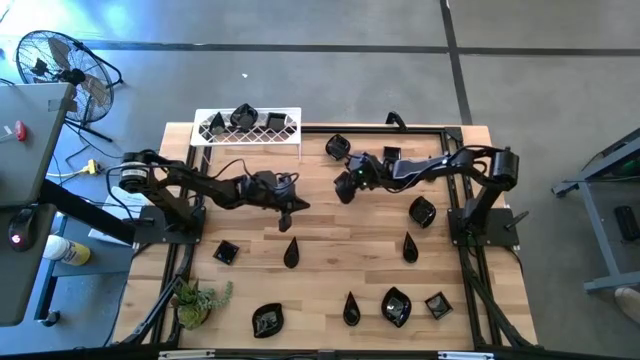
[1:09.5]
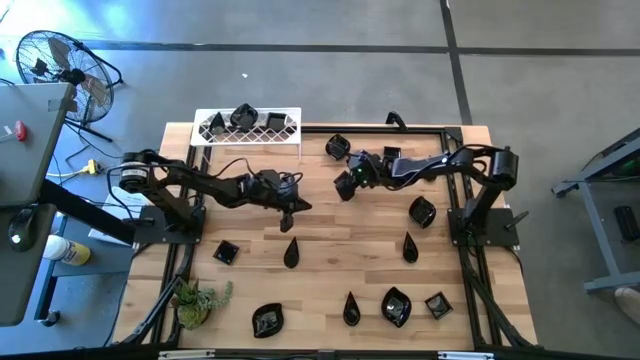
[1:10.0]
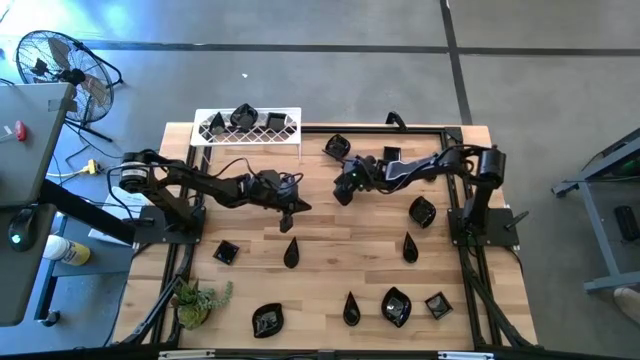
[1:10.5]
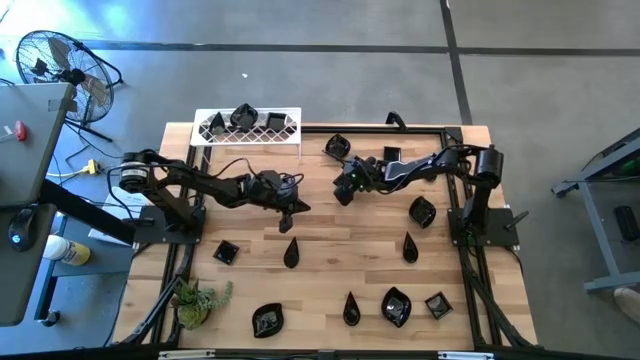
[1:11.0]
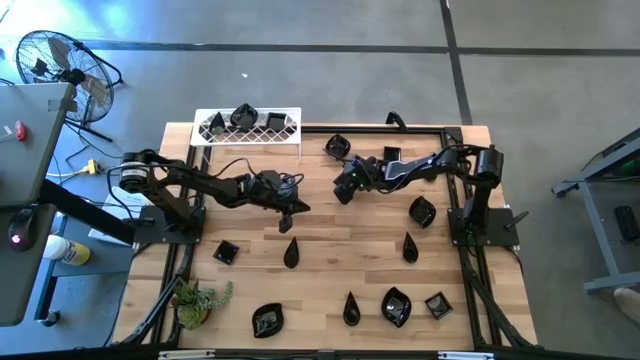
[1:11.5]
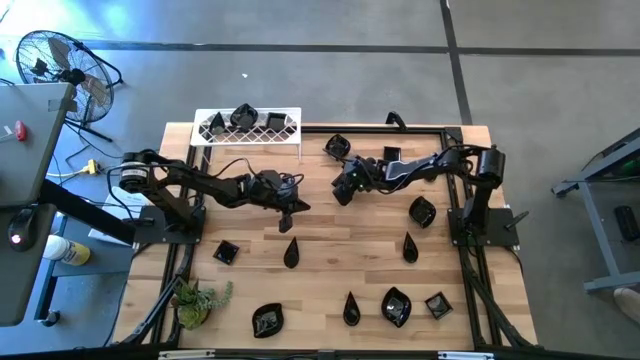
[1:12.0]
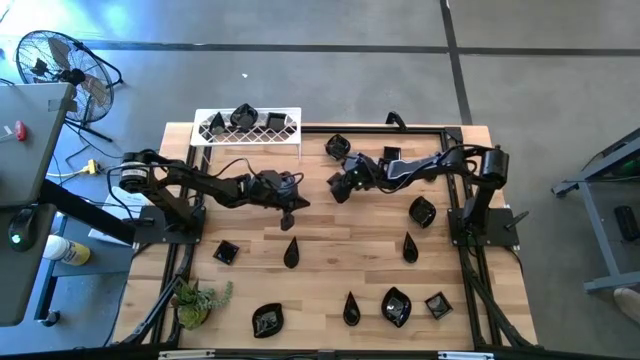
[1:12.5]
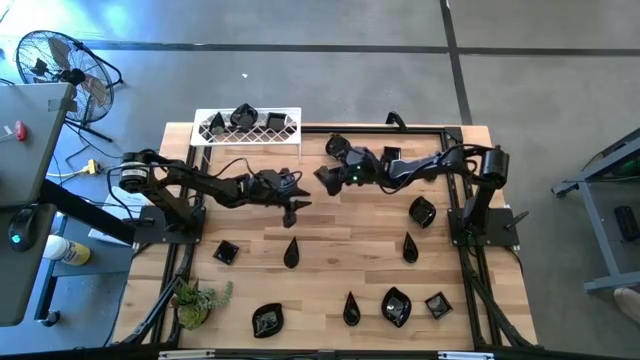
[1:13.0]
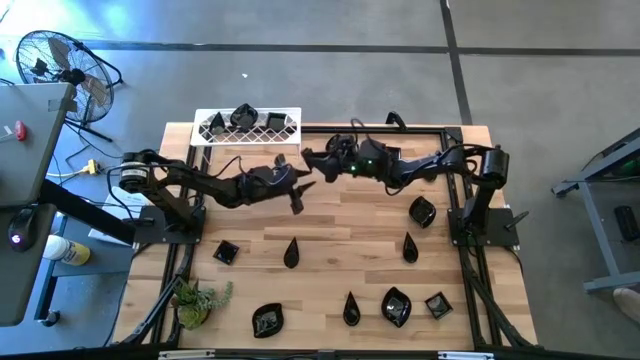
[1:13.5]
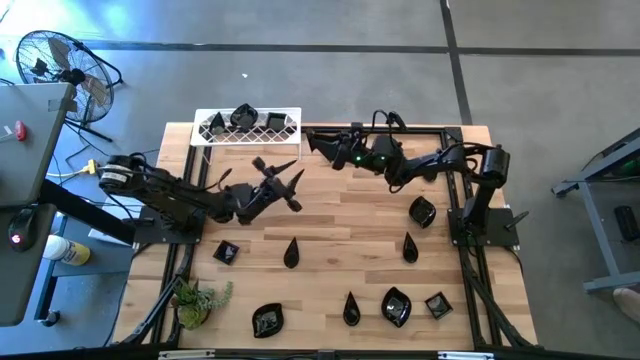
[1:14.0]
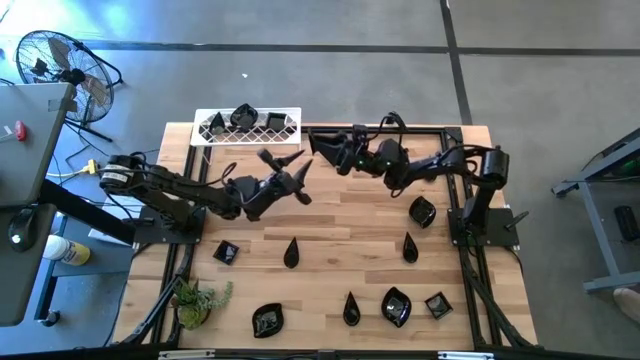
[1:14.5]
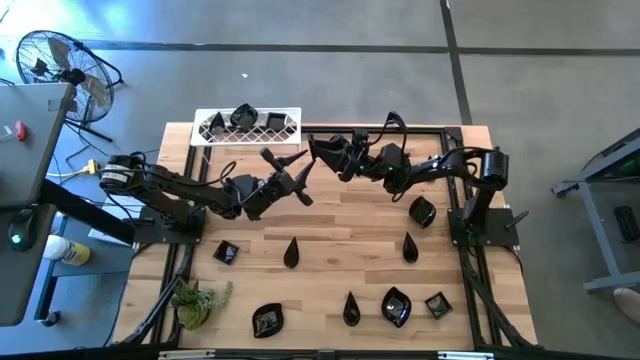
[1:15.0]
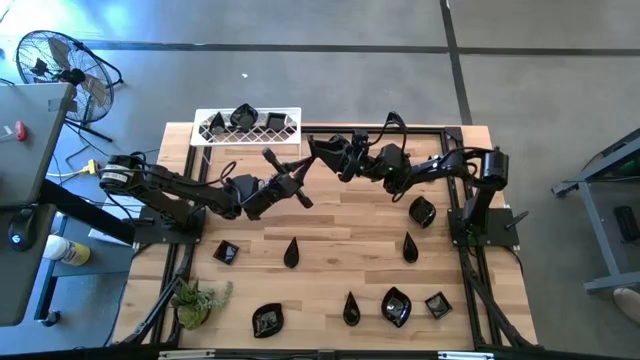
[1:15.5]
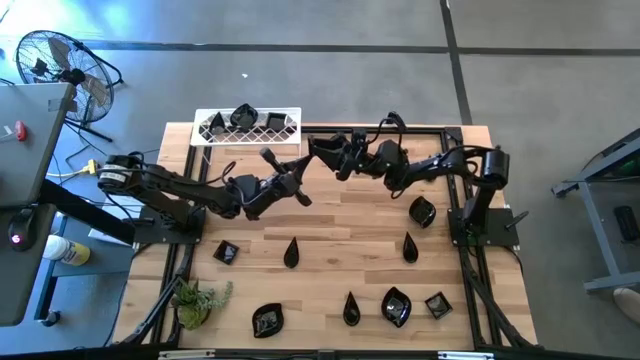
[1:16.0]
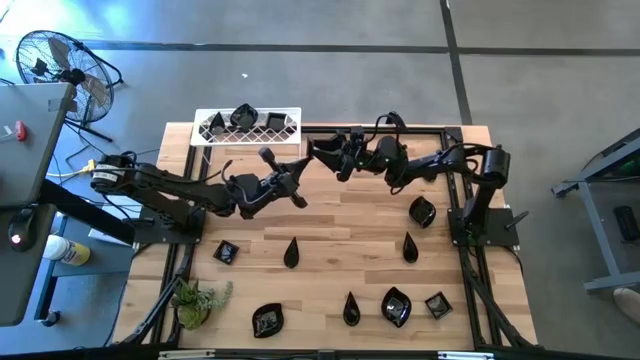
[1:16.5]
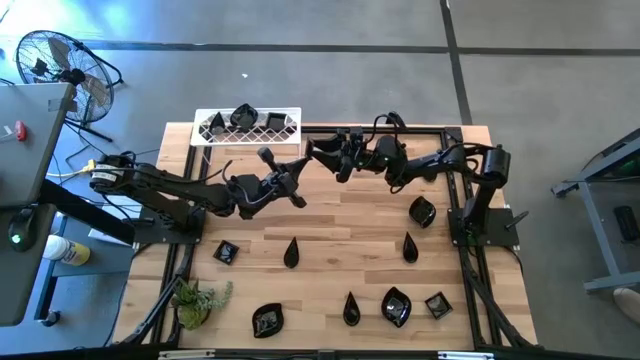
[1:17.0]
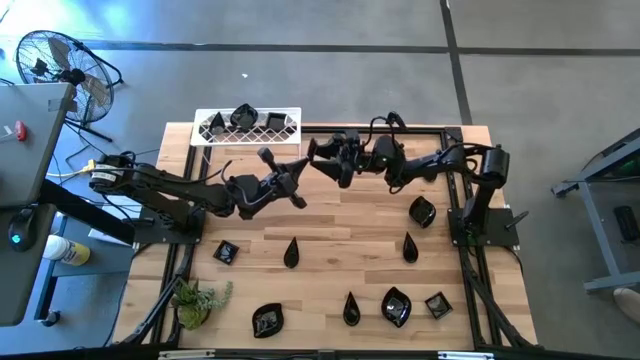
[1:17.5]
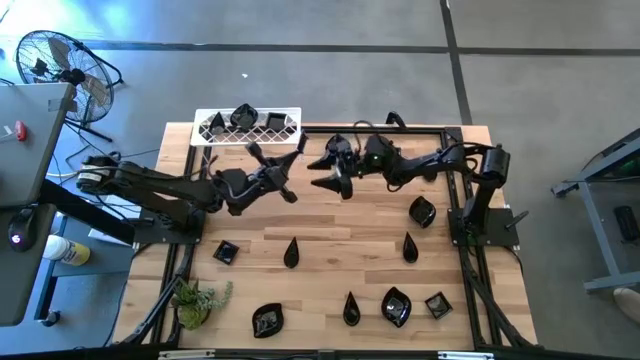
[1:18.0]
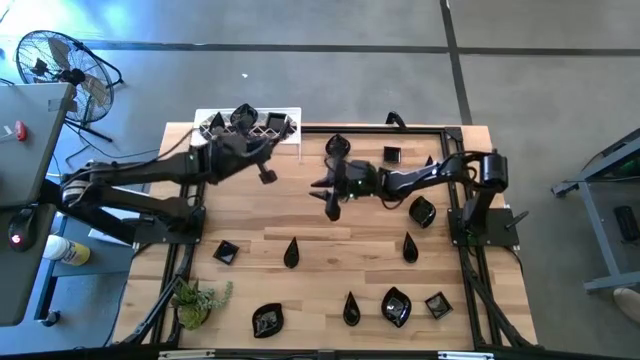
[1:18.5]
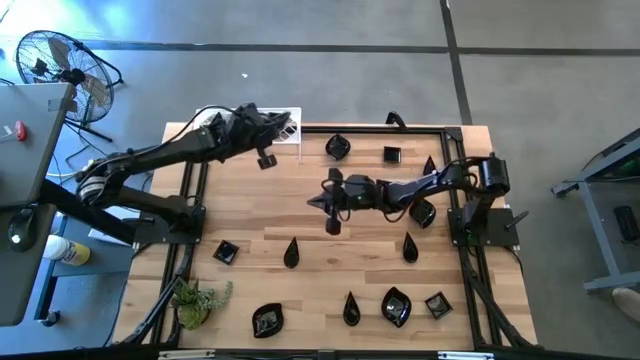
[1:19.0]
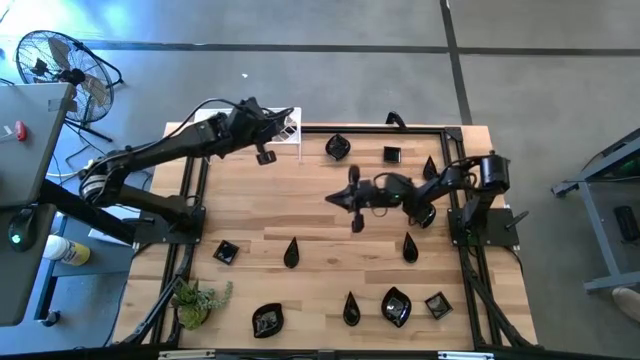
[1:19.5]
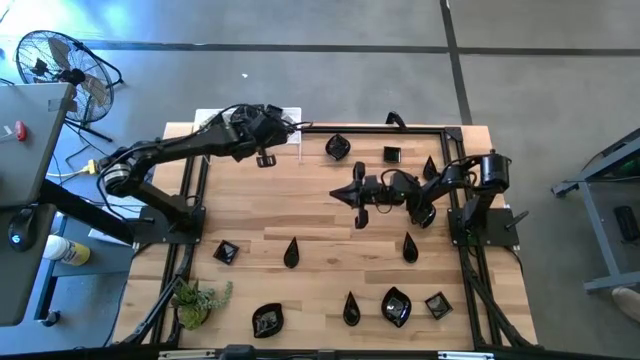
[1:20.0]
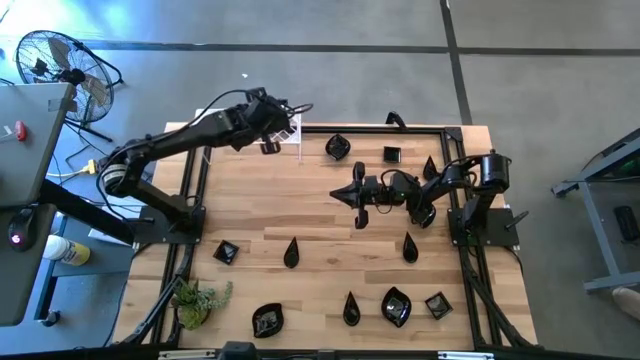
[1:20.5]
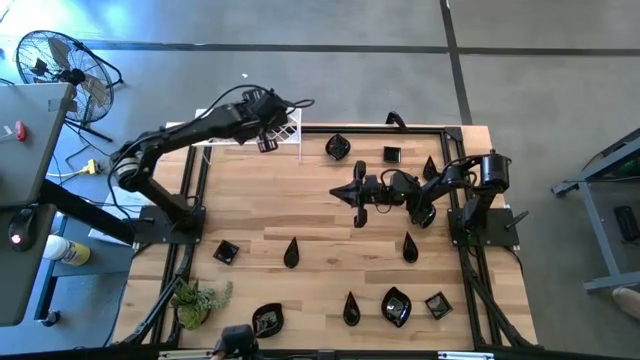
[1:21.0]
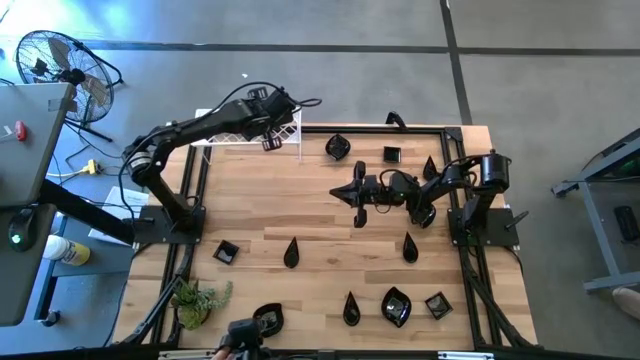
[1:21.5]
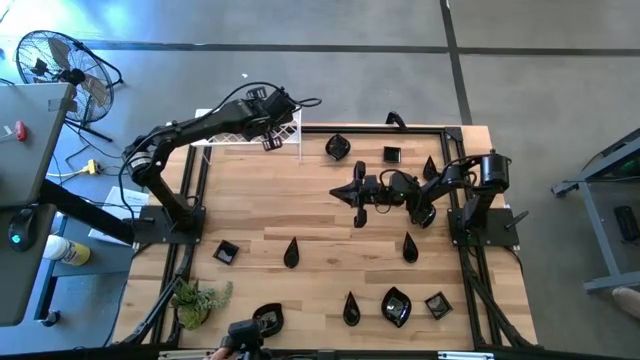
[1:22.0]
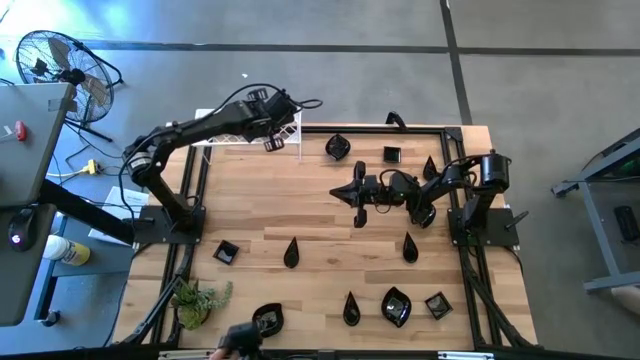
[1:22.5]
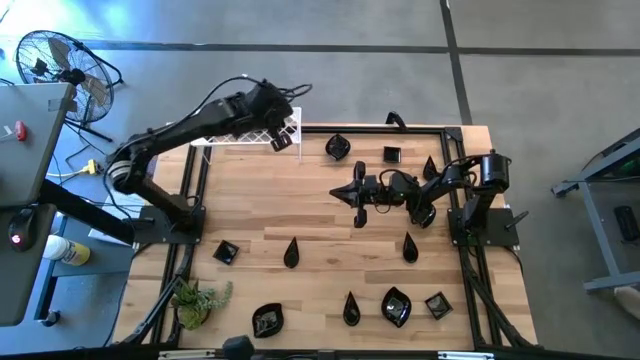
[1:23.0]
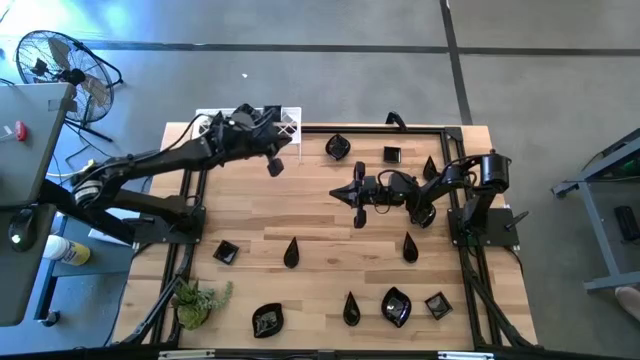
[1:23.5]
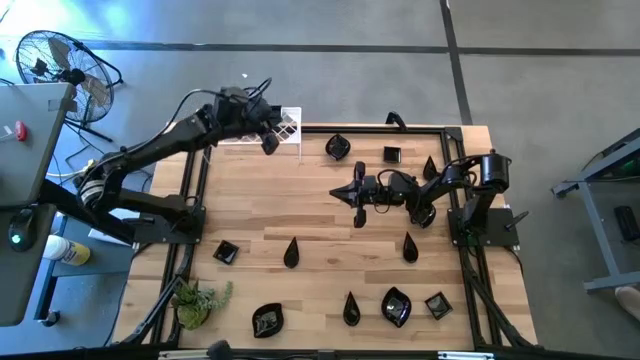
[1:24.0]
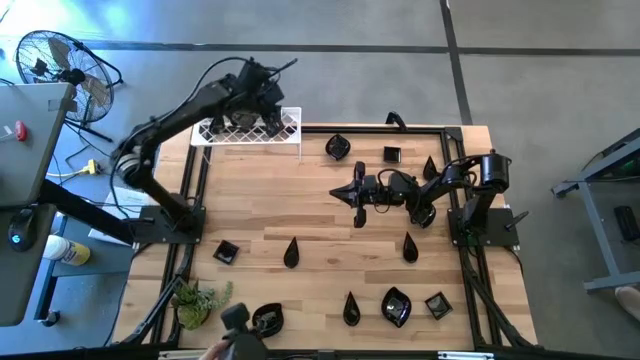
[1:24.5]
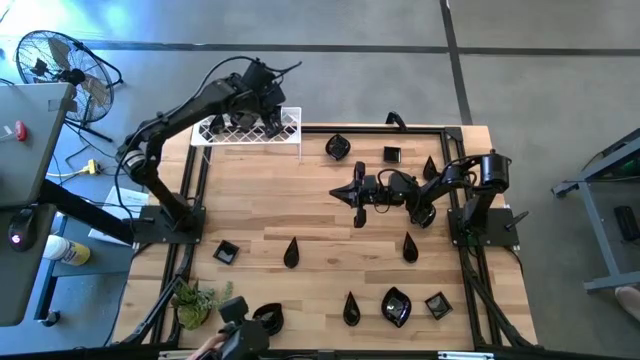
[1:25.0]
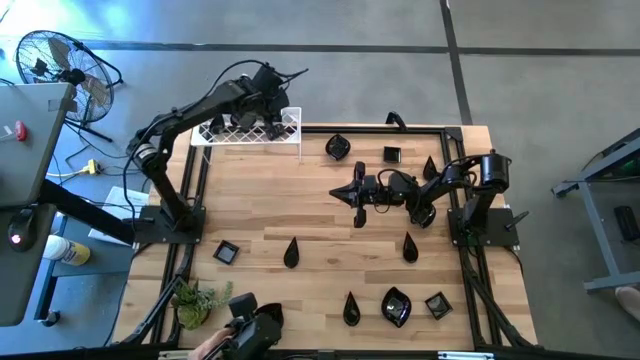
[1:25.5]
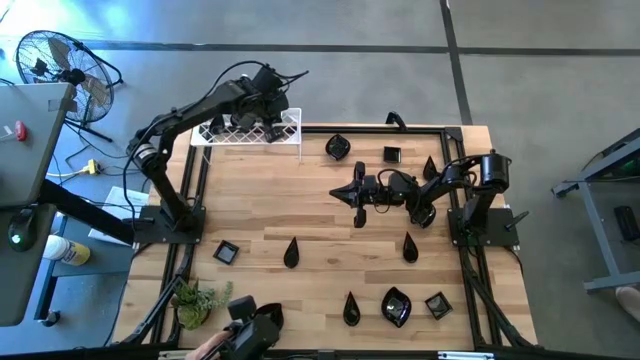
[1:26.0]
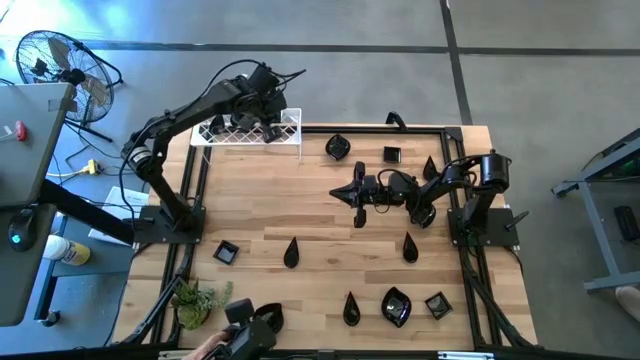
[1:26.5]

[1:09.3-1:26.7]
Task: Pick & Place Mini shaped plates
Stack the square plate on top of the square plate on the shelf

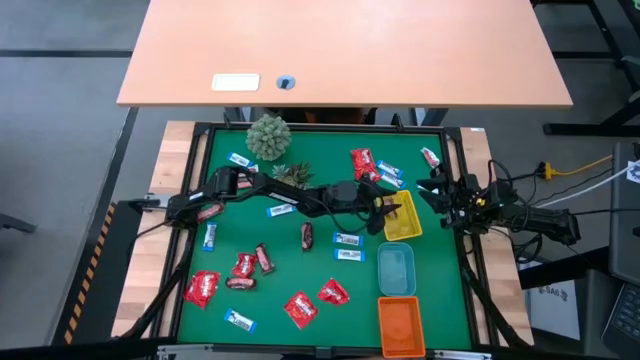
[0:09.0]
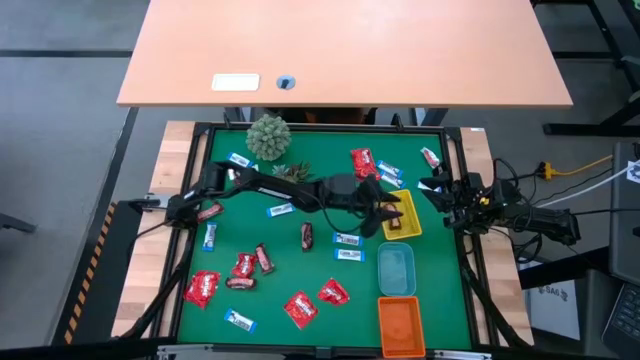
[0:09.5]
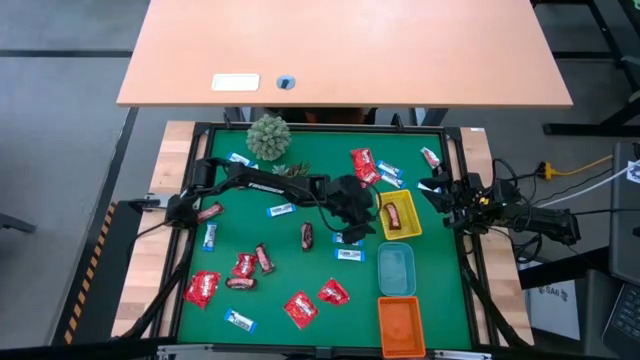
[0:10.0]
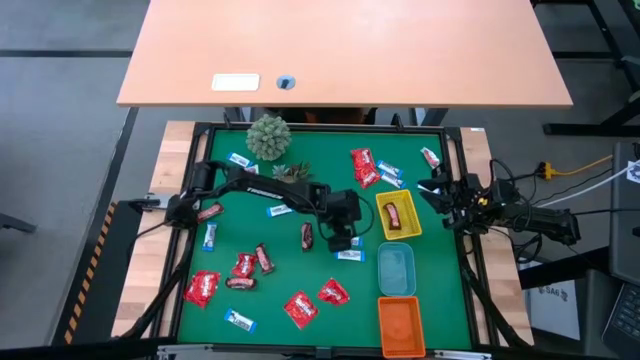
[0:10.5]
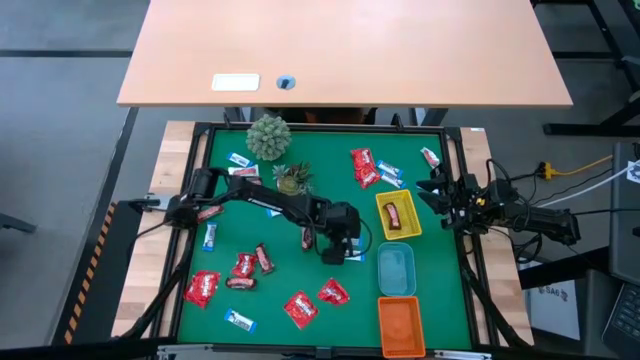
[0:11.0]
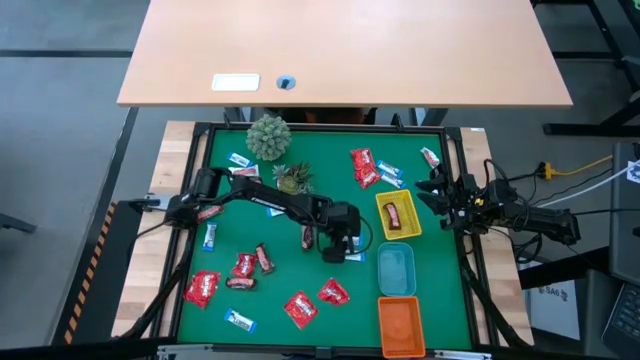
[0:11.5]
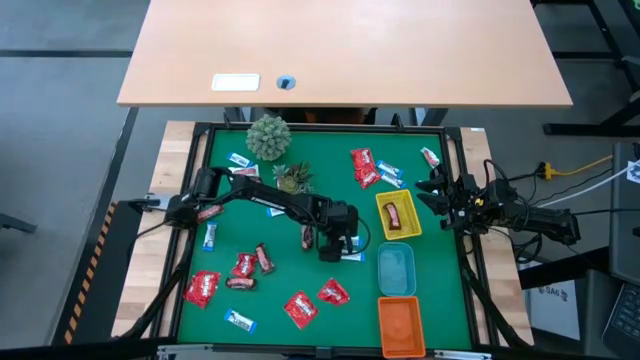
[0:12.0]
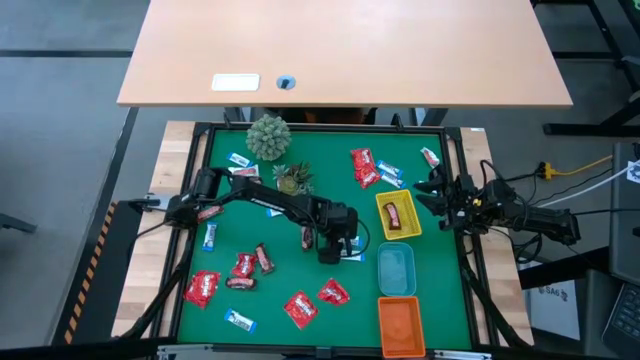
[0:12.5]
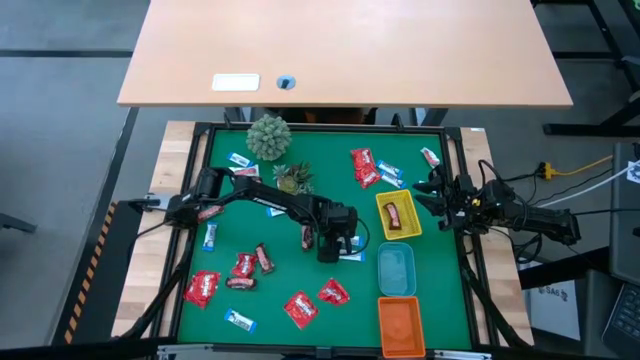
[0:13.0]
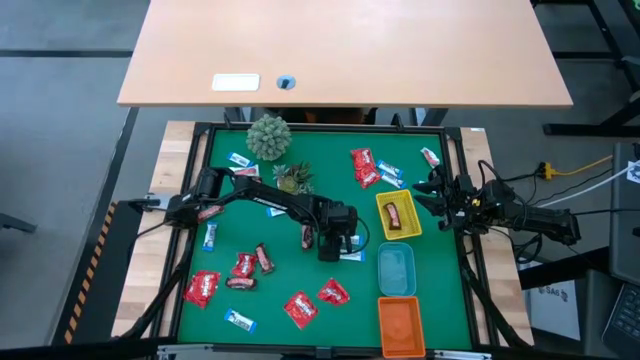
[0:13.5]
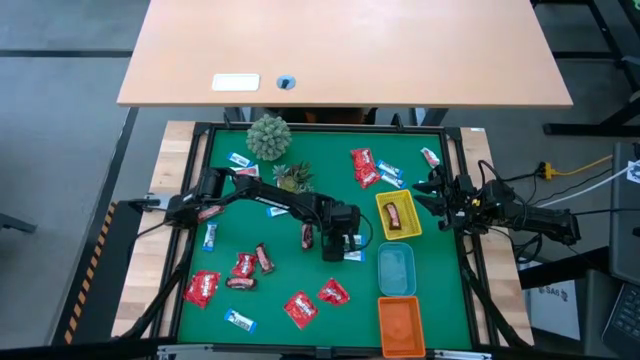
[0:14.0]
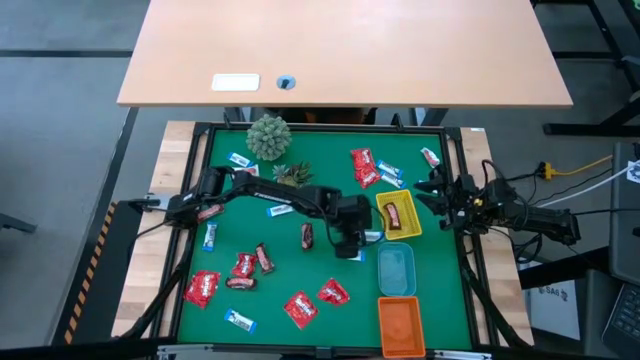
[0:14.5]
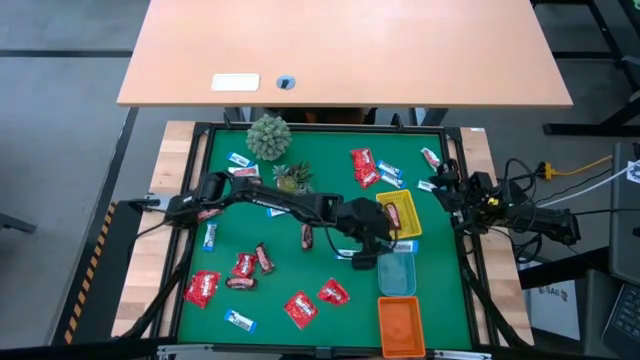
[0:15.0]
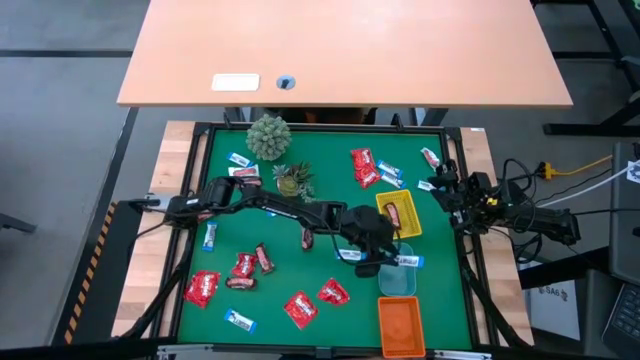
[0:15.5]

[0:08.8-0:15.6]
Task: Sort candy
Put the white chocolate into the blue bin
